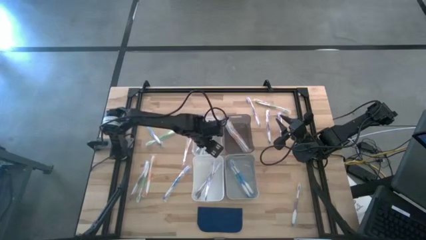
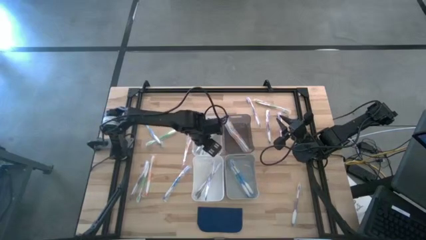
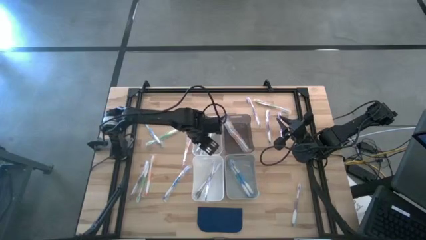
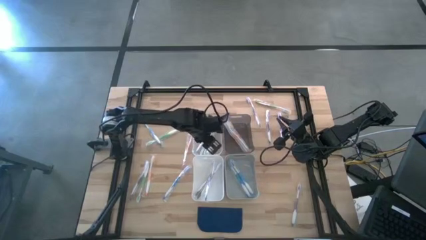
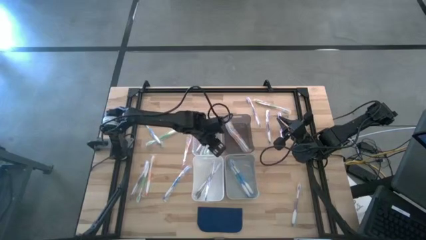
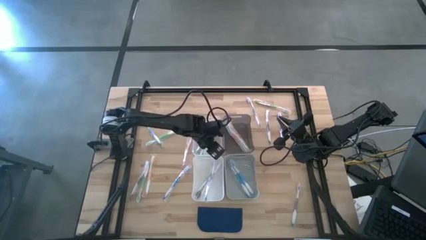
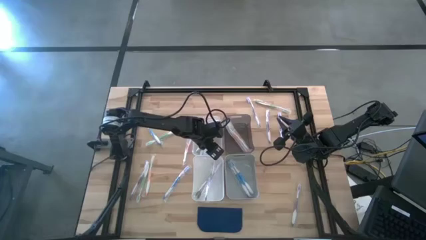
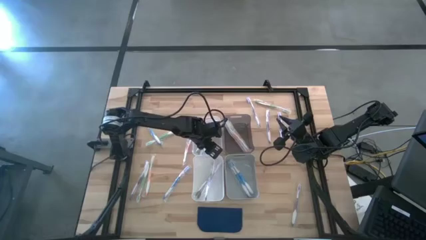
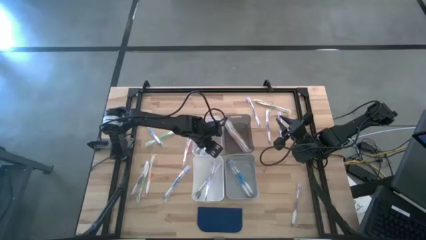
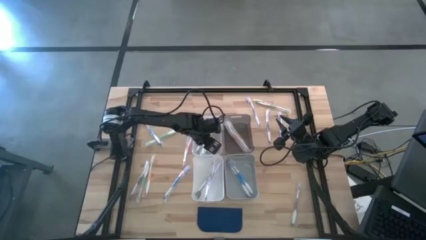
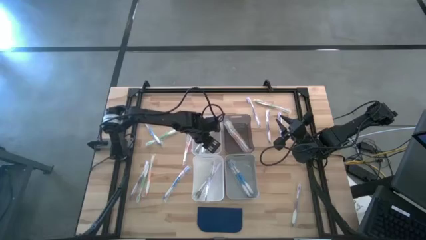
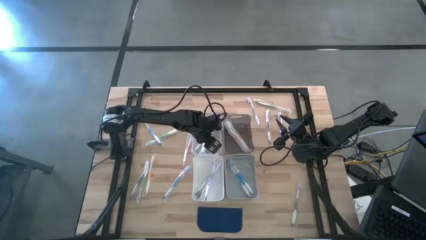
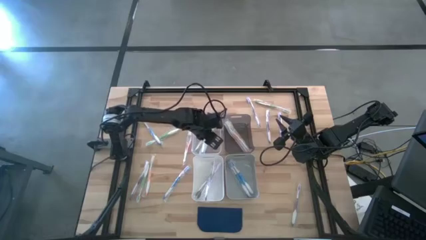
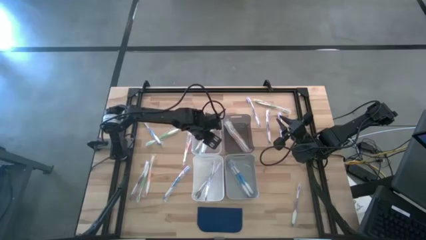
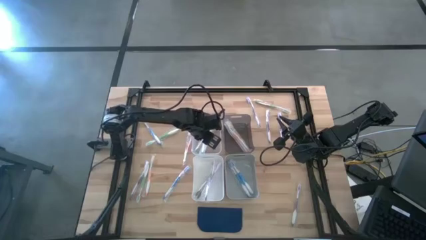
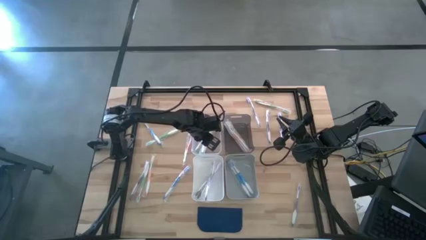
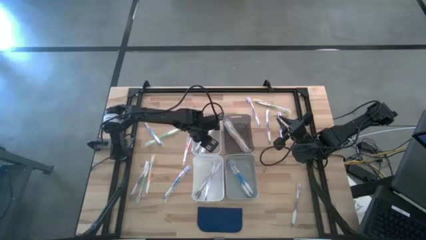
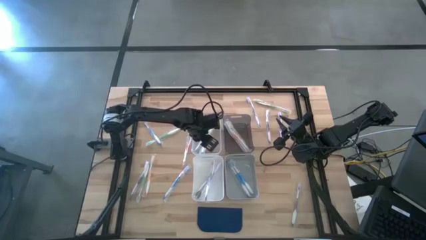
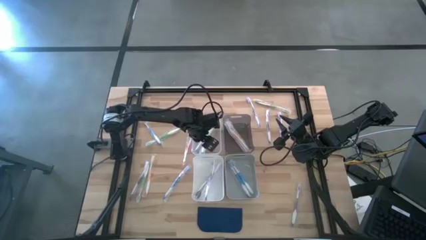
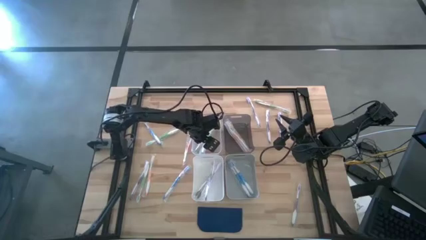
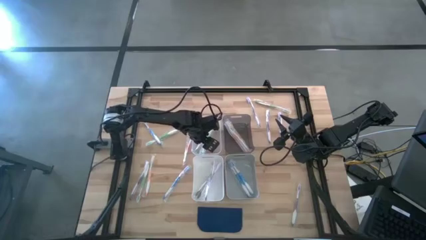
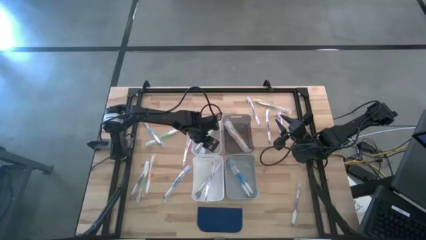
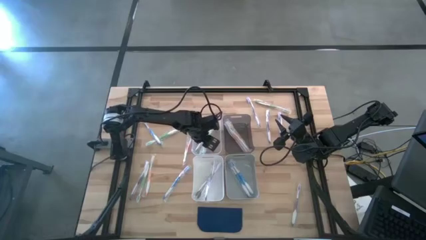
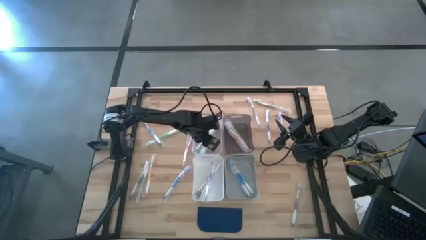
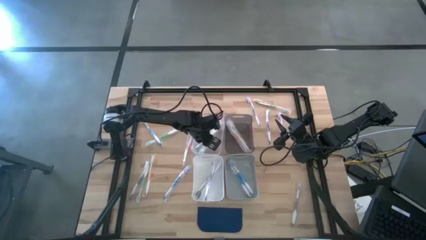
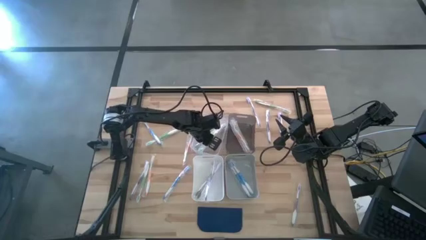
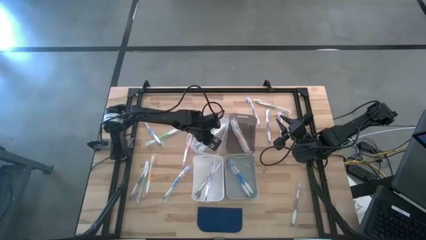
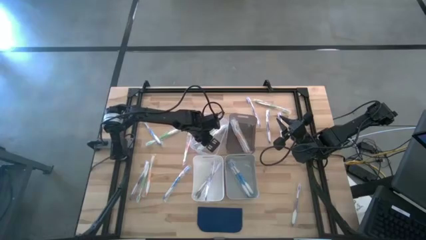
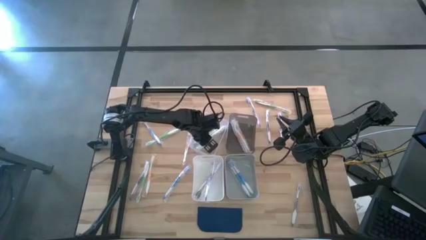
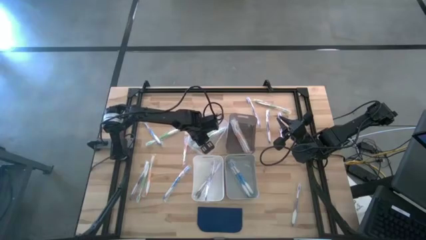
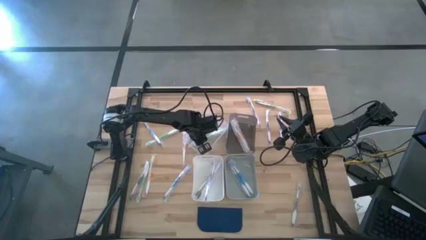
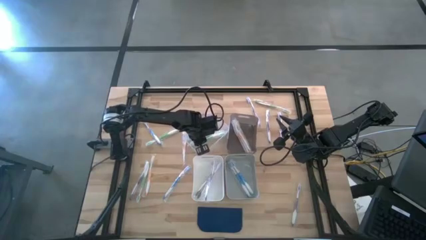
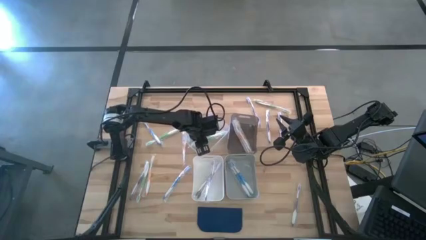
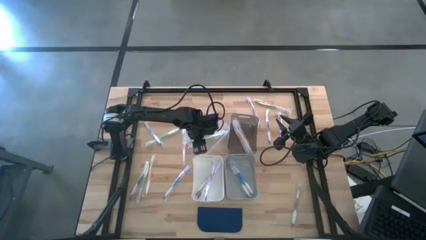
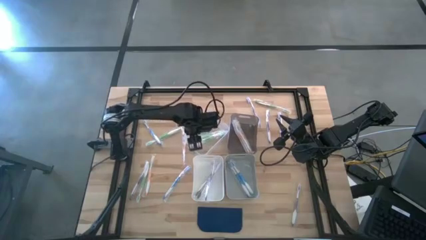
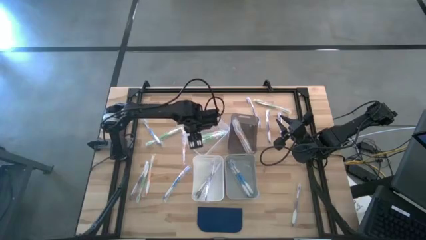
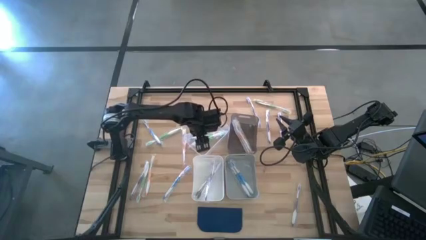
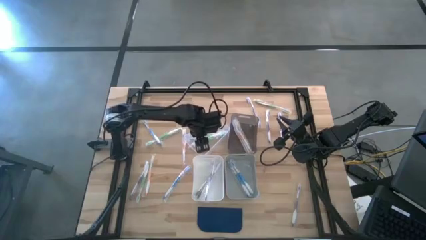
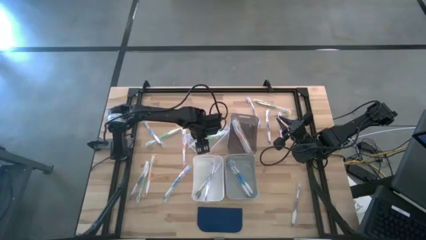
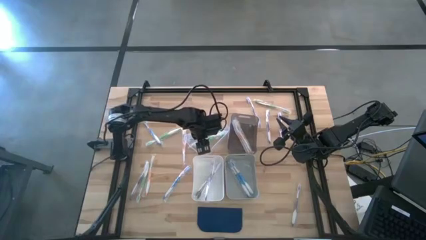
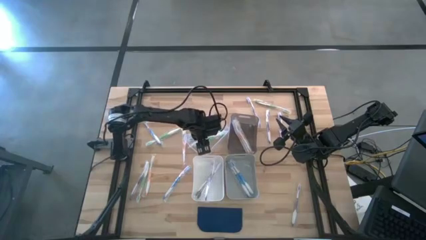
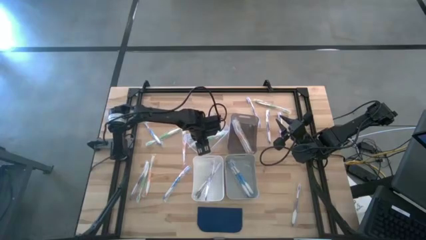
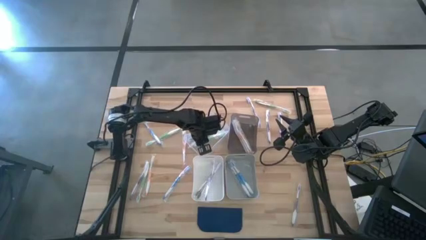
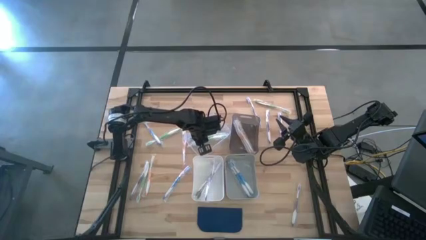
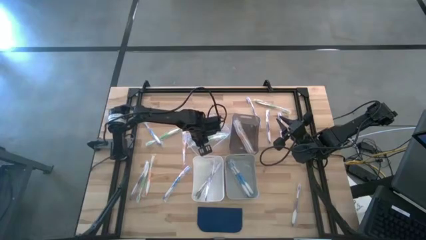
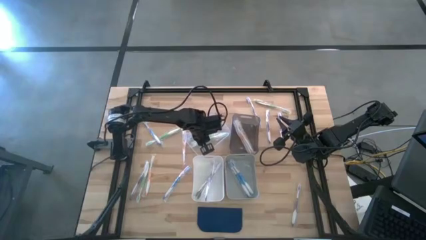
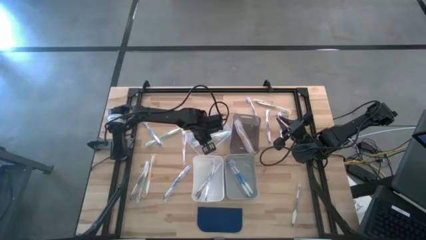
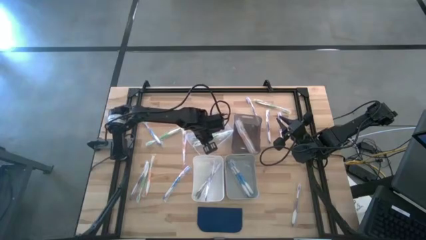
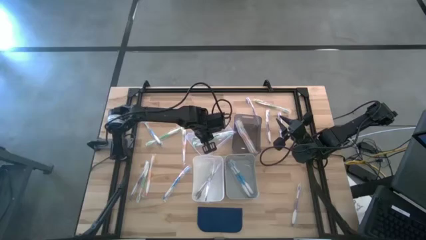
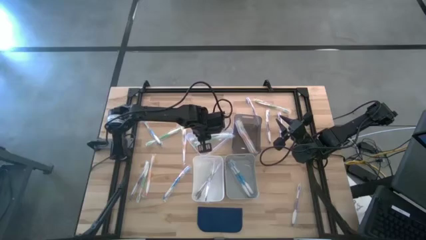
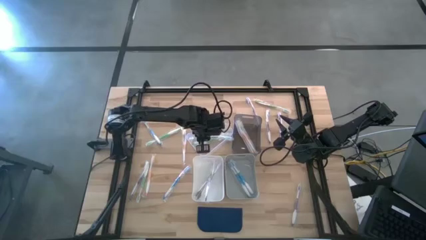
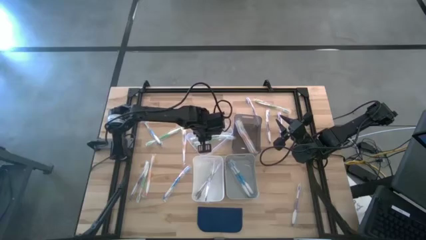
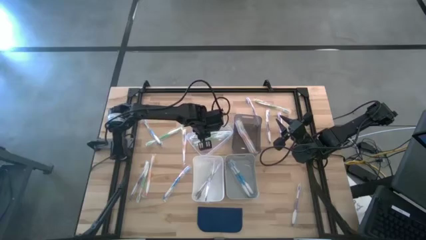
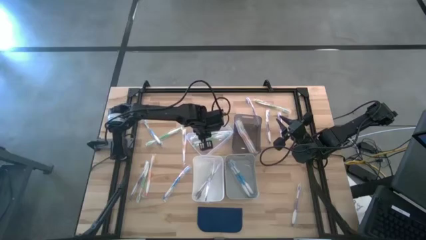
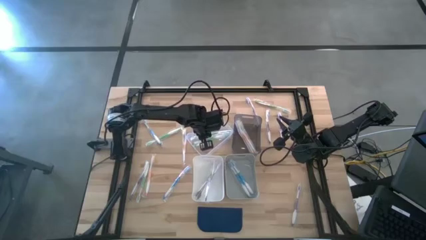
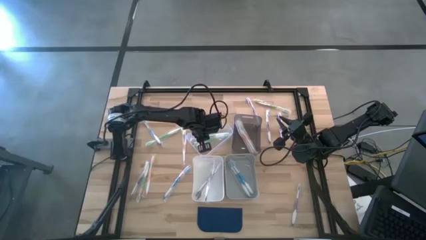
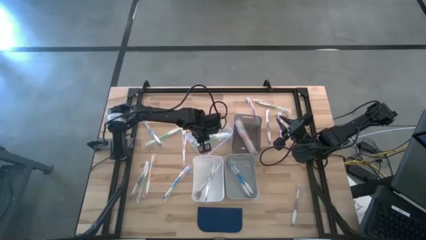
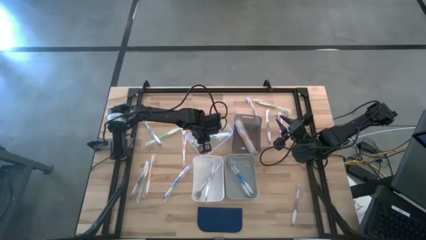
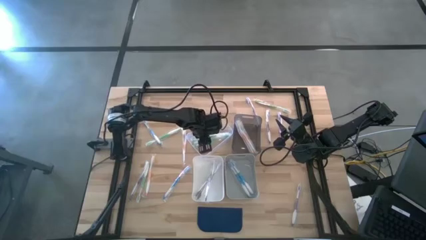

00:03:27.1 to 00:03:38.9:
Task: Pick & Place Toothbrushes
Put the green toothbrush into the transparent bin

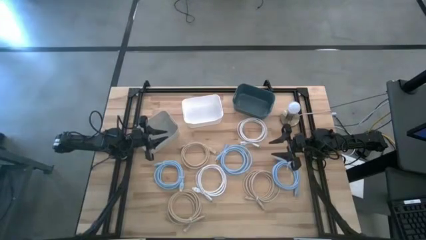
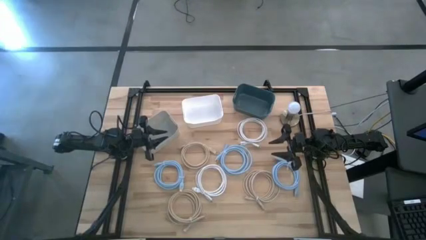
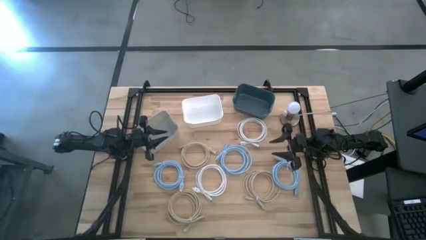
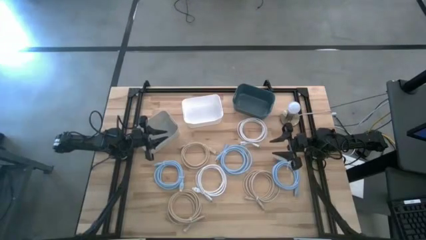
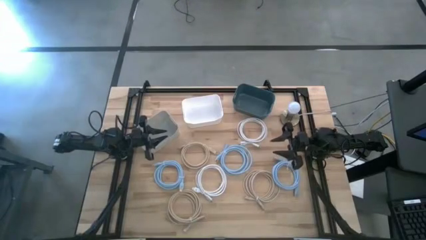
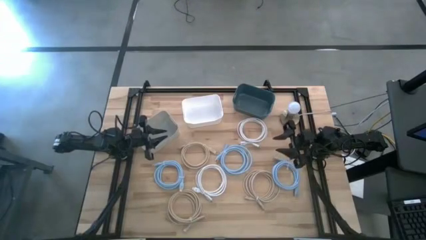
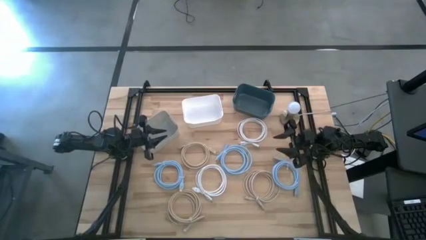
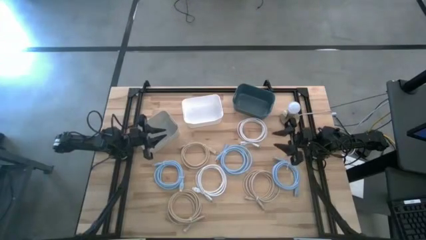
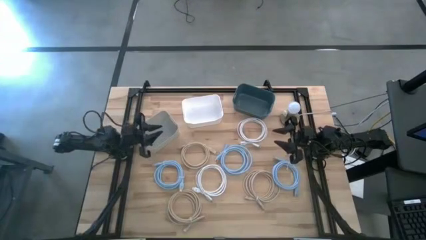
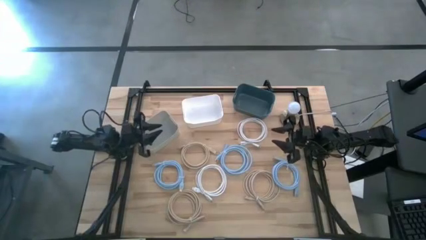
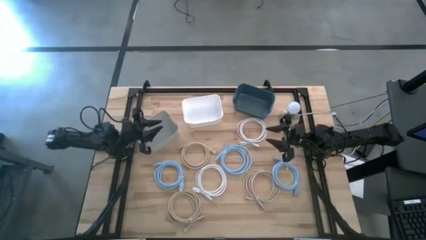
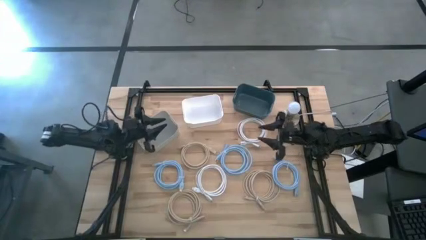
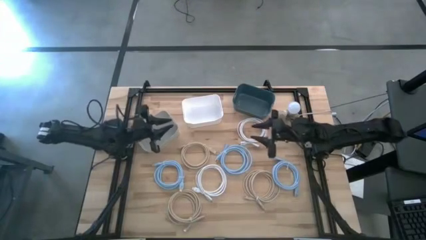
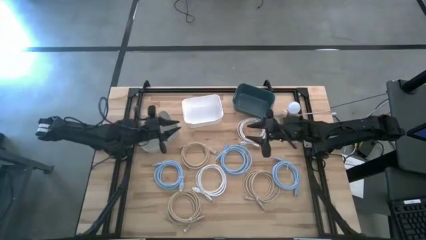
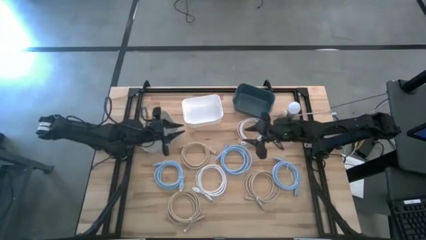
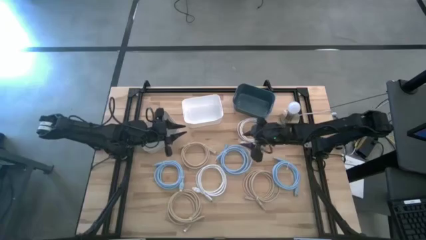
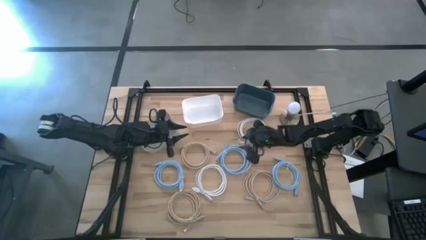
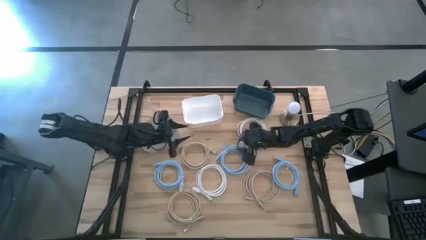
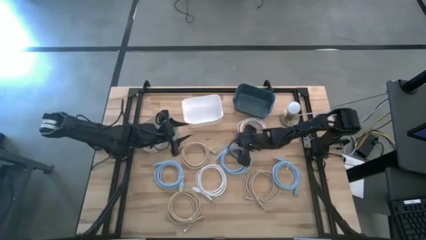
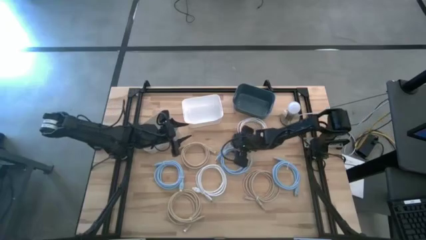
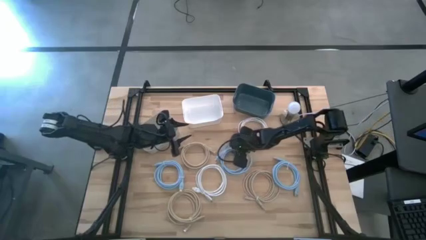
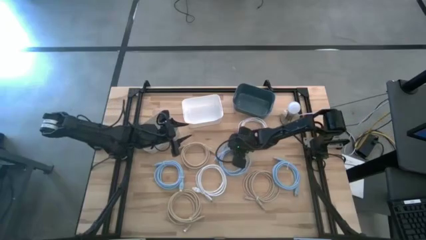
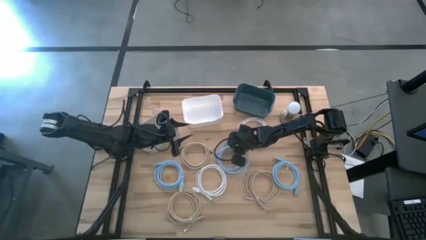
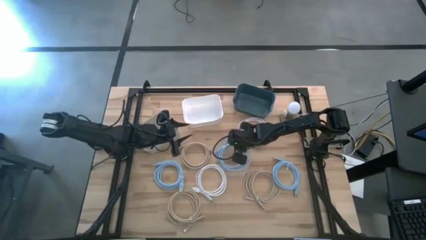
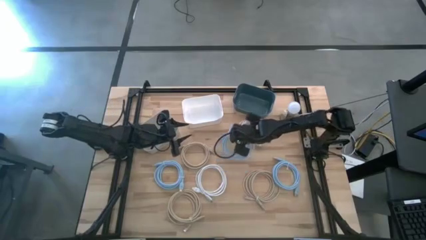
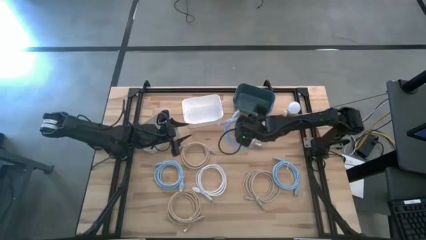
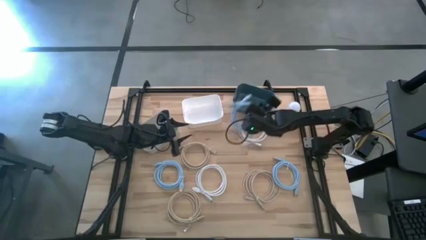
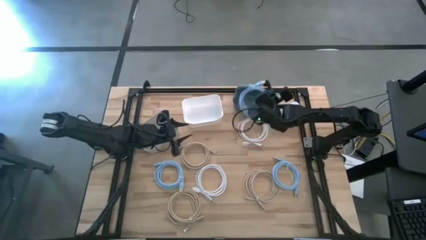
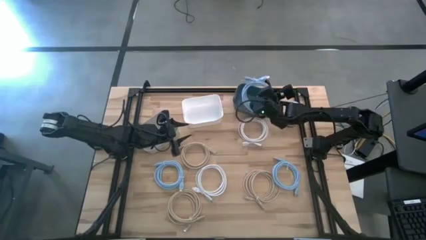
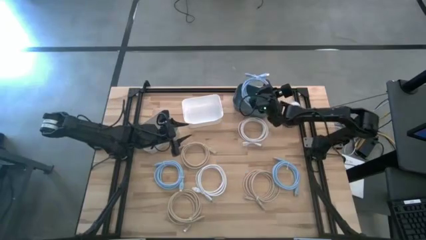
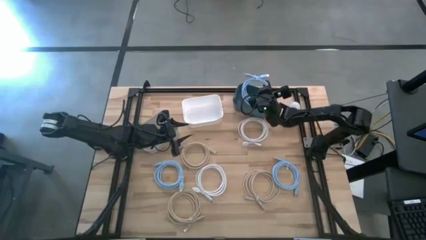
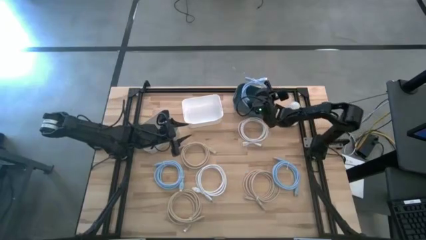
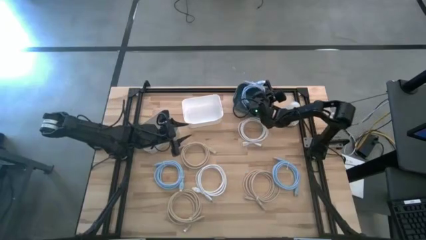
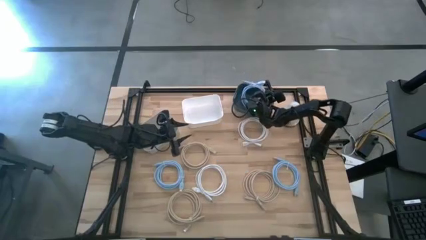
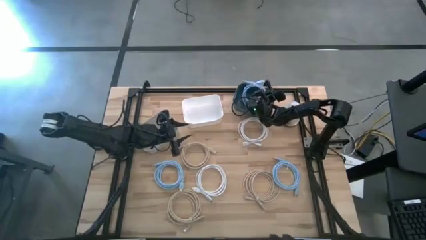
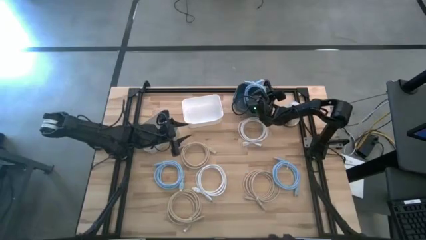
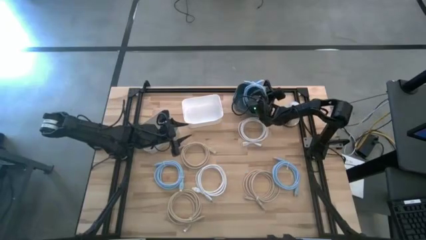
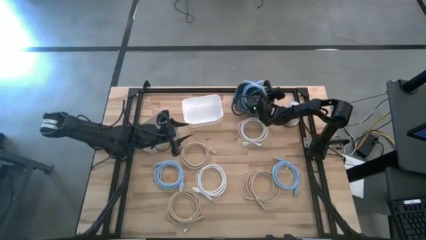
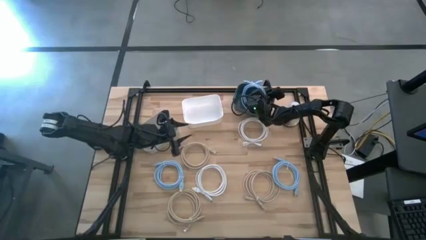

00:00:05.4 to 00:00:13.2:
Task: Pick & Place USB Port
Put the middle blue charger cable into the blue bin
